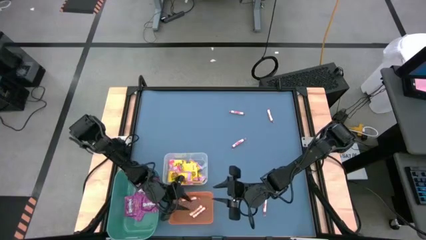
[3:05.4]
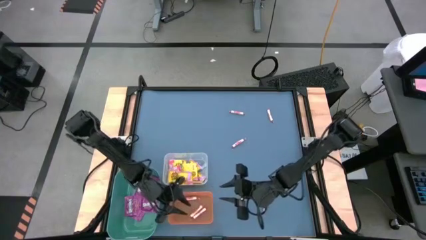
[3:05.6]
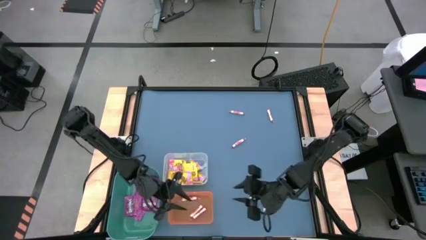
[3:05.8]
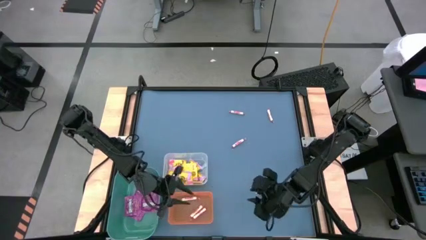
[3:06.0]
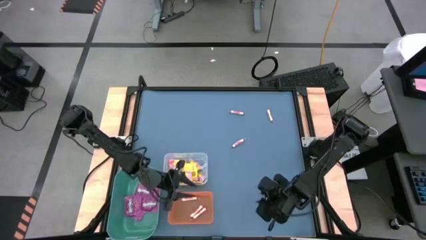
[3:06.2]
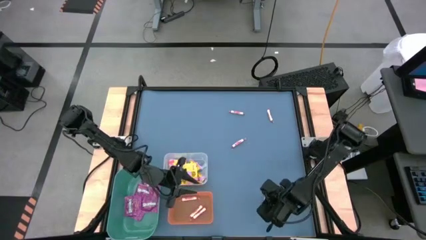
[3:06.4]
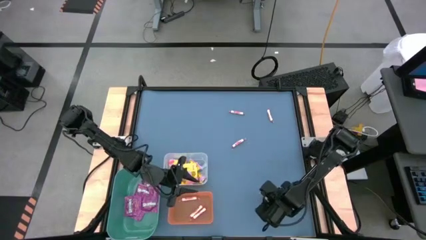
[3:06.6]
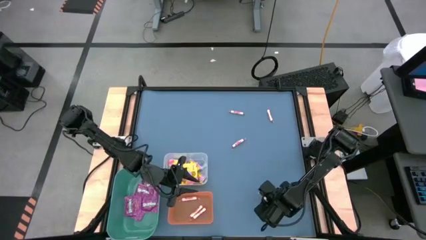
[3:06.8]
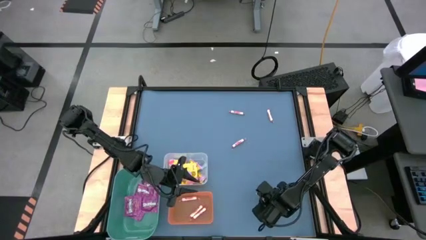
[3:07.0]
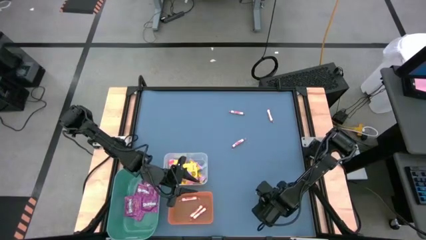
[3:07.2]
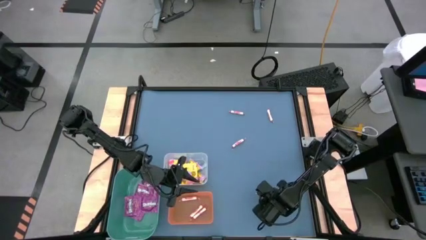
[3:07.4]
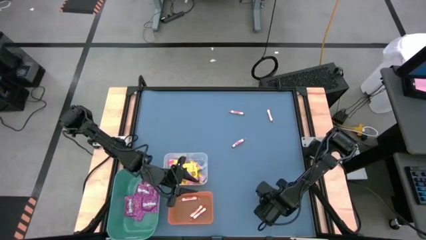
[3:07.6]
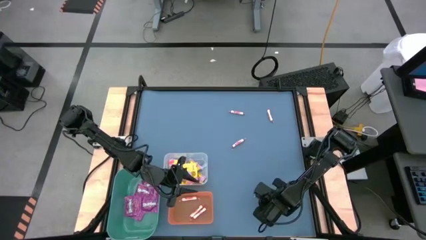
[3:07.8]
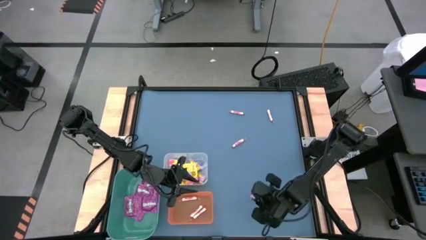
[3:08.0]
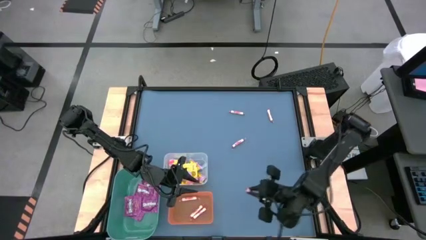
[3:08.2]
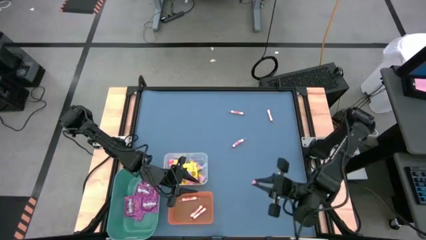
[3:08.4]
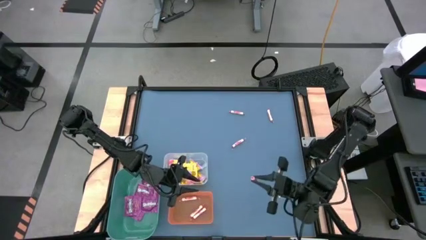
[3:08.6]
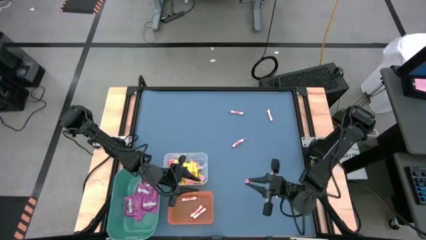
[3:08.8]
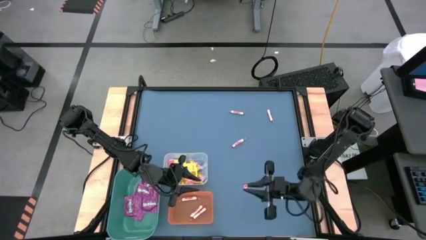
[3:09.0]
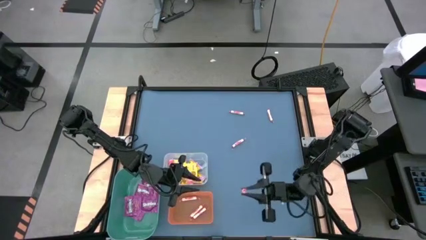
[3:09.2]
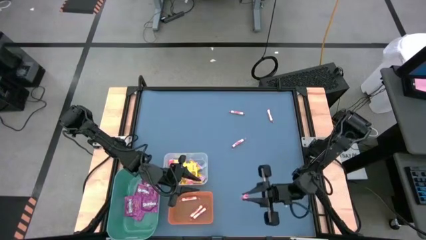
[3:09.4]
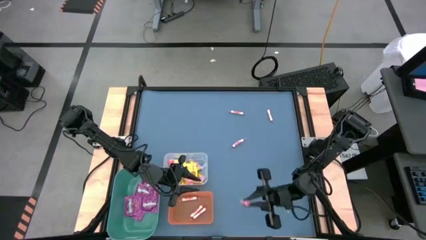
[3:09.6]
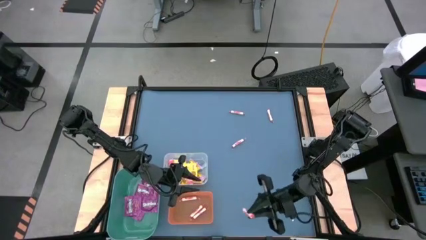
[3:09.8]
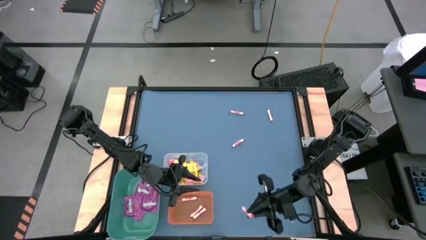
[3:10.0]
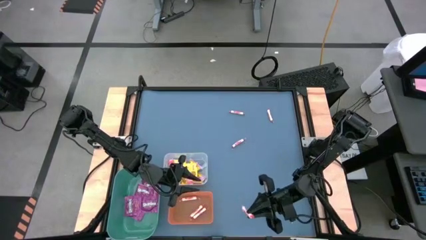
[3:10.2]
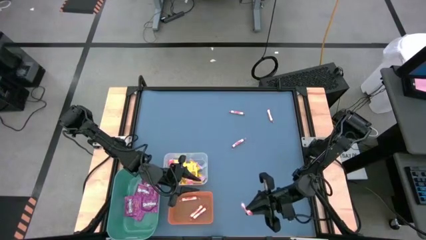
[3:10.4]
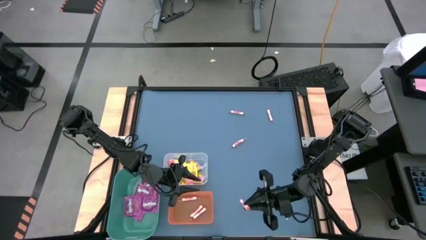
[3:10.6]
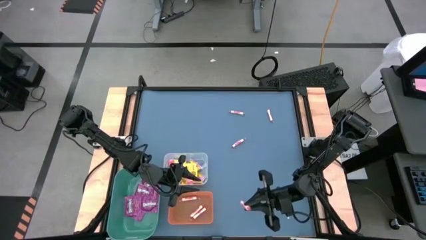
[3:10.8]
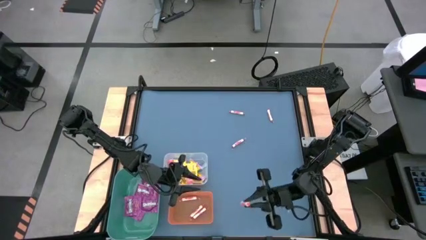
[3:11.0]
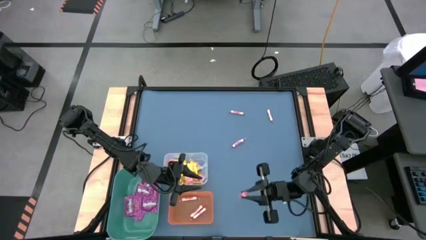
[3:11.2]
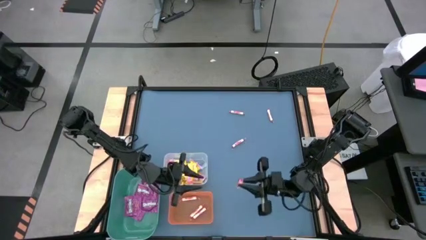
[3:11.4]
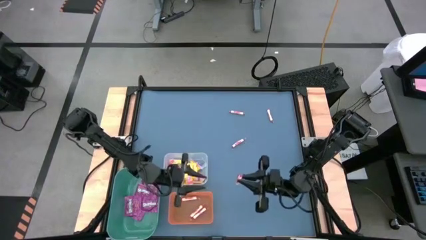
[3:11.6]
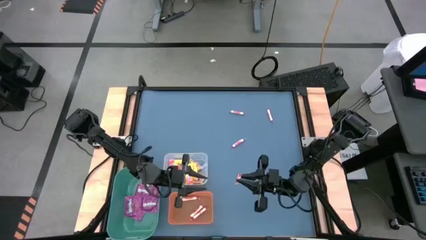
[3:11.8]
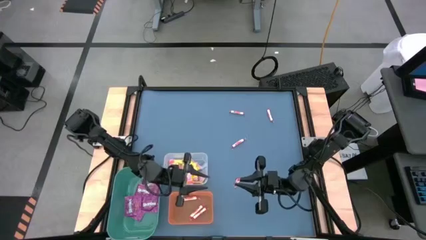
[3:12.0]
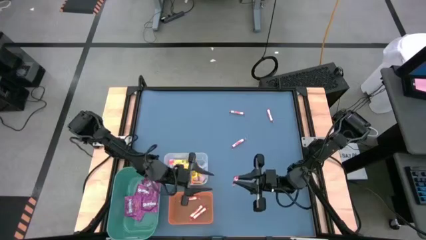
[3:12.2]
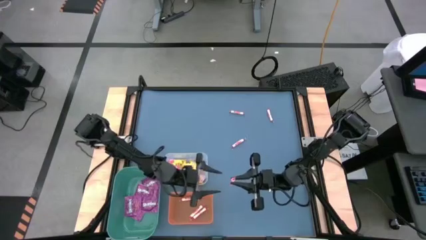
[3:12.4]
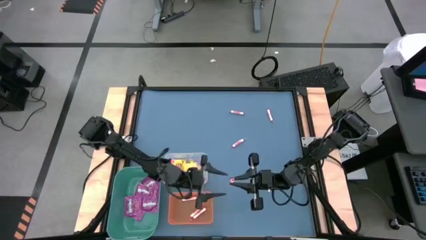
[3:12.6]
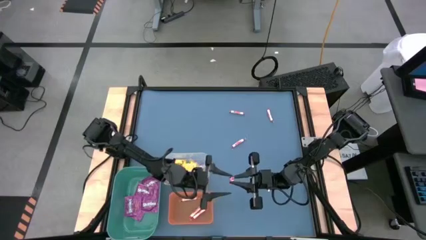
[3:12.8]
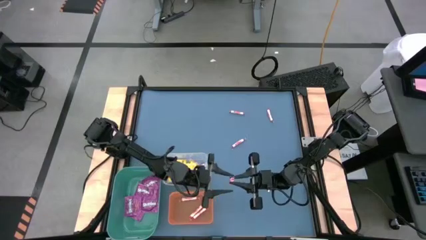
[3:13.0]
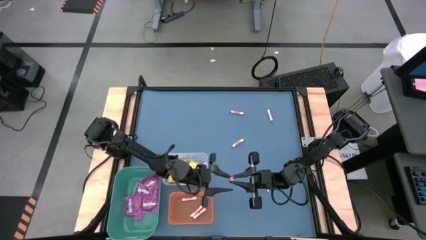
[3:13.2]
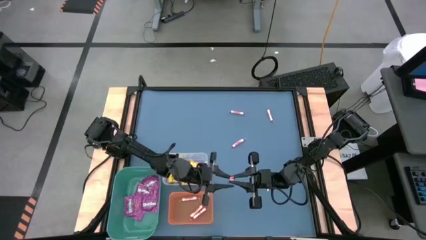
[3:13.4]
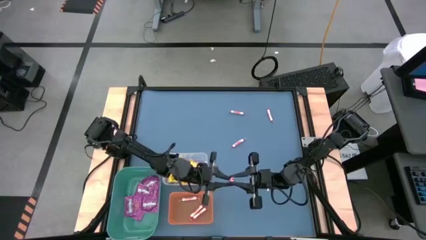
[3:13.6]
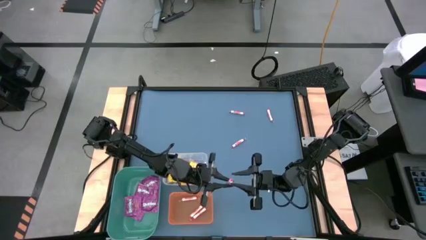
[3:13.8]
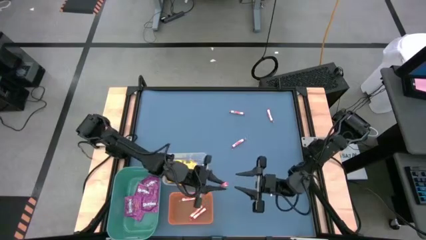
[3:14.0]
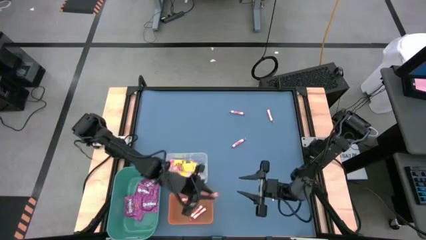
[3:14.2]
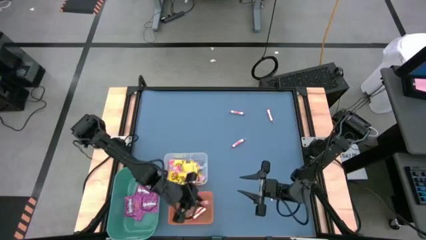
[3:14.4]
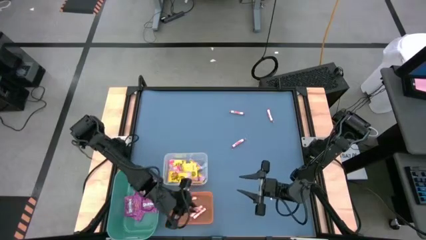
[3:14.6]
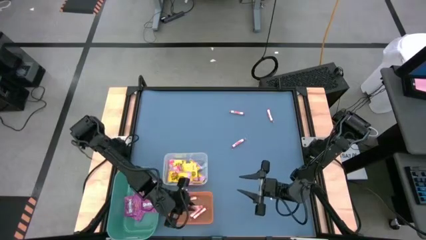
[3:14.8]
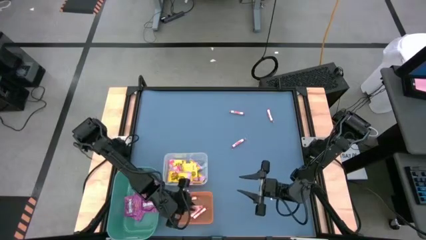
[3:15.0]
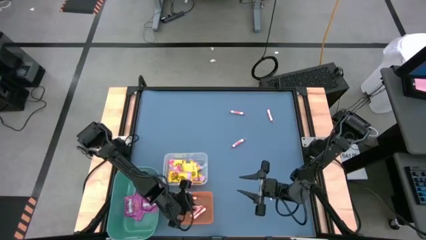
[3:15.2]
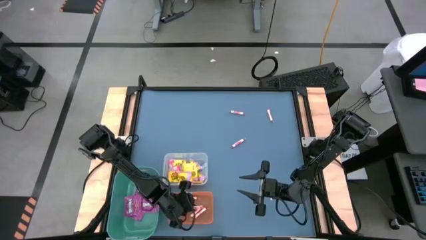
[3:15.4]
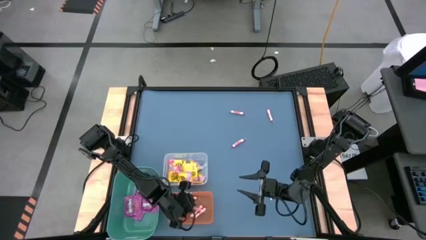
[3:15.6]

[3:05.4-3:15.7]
Task: Sort candy
Put the red candy into the orange bin

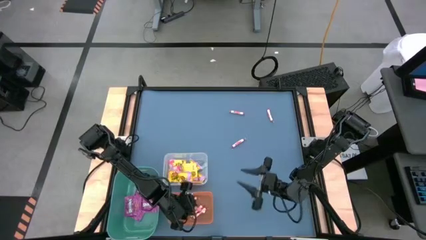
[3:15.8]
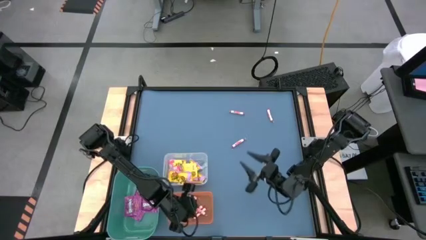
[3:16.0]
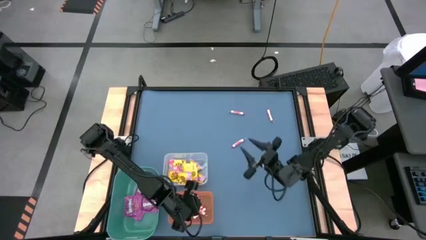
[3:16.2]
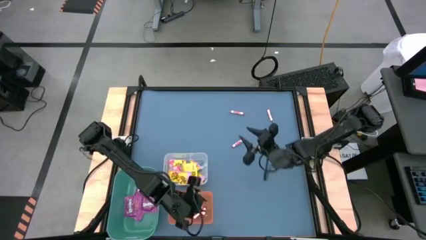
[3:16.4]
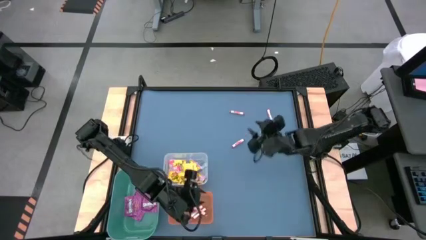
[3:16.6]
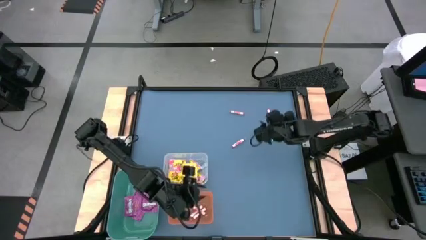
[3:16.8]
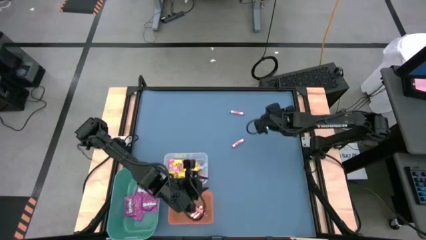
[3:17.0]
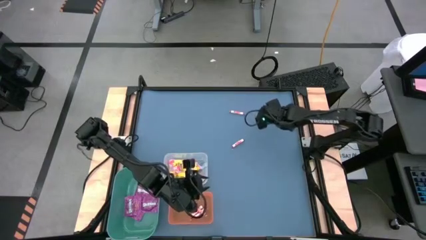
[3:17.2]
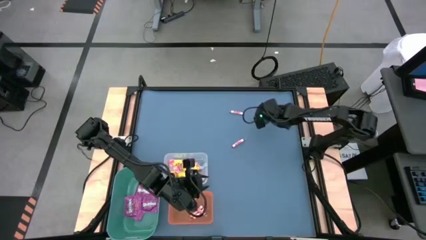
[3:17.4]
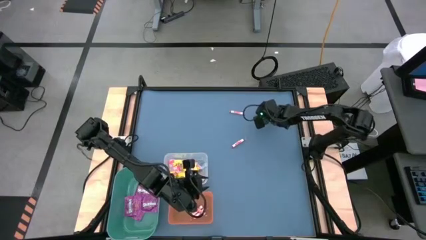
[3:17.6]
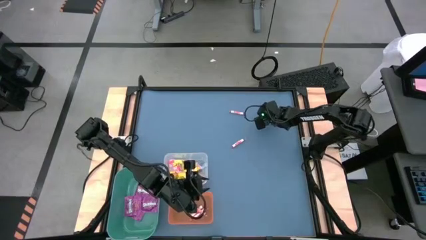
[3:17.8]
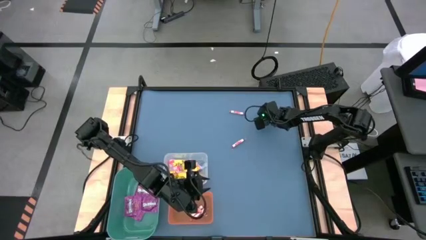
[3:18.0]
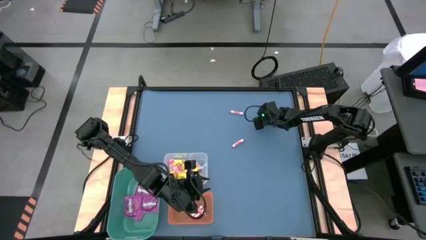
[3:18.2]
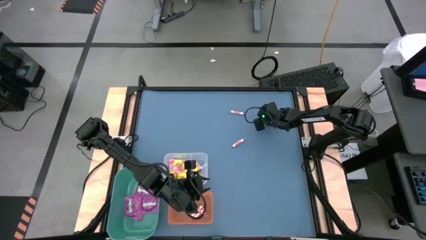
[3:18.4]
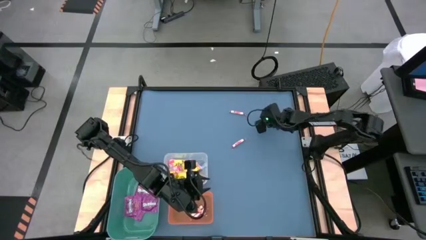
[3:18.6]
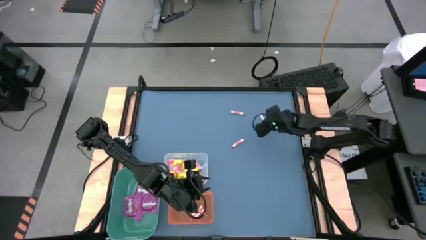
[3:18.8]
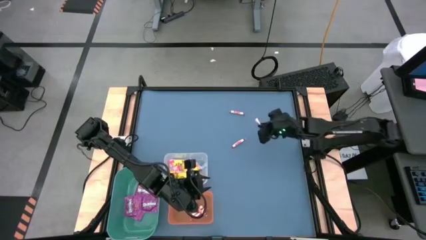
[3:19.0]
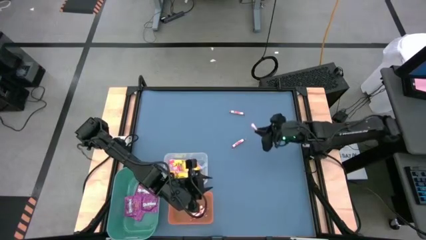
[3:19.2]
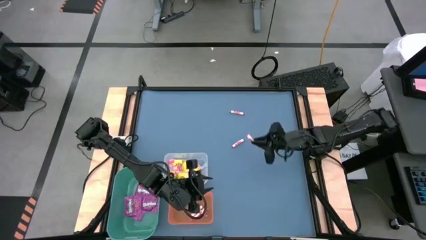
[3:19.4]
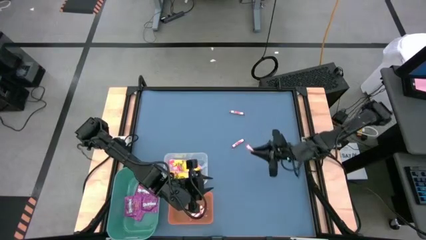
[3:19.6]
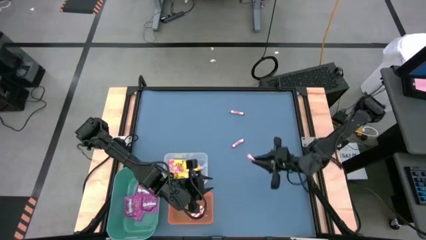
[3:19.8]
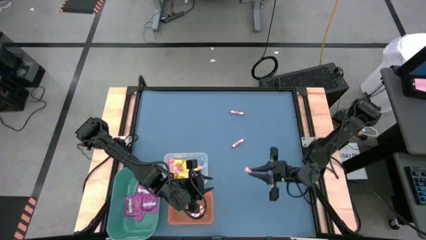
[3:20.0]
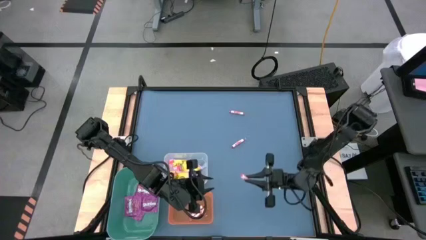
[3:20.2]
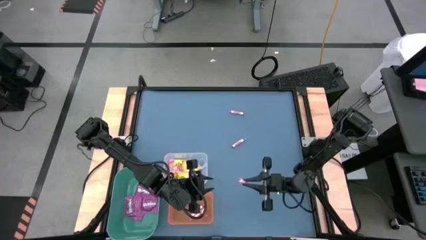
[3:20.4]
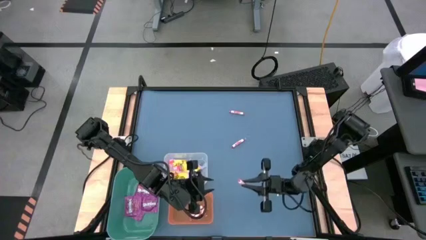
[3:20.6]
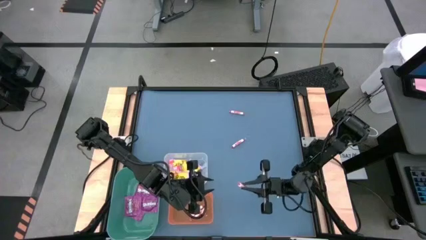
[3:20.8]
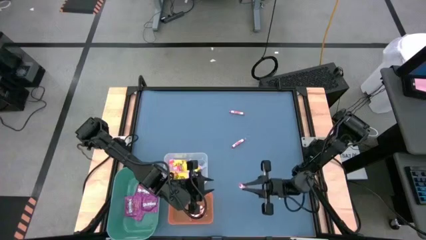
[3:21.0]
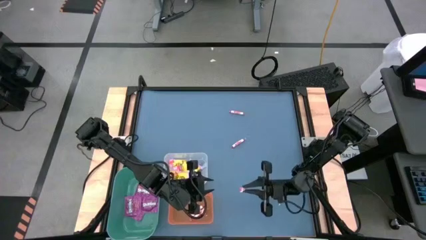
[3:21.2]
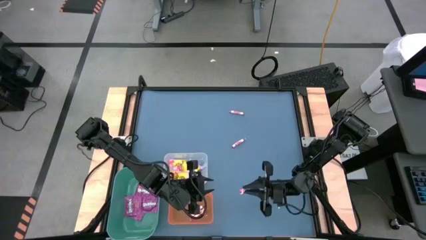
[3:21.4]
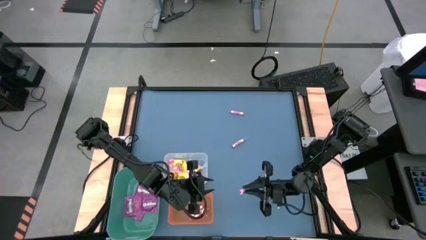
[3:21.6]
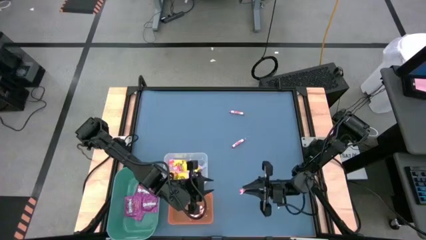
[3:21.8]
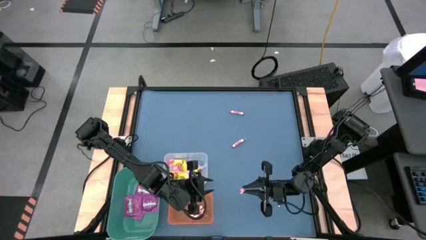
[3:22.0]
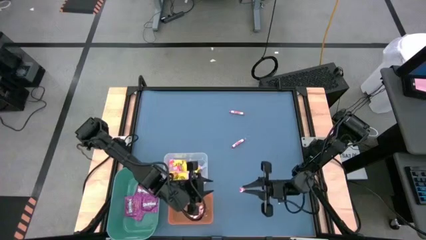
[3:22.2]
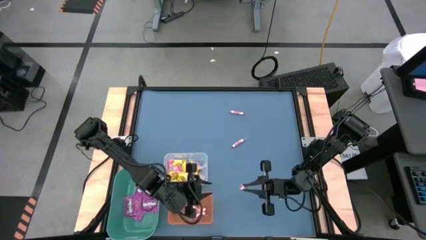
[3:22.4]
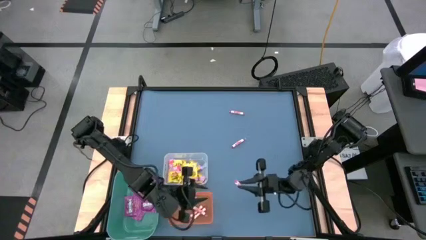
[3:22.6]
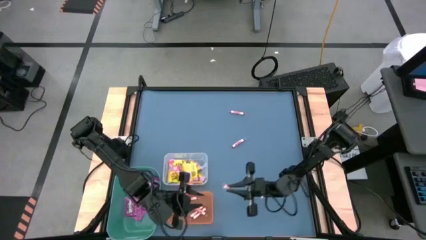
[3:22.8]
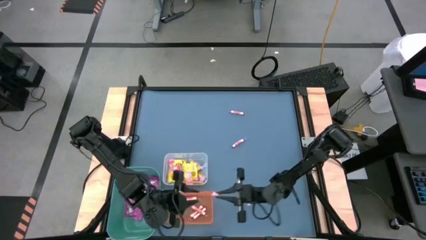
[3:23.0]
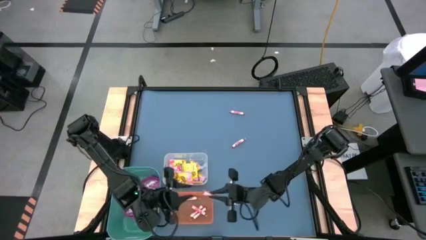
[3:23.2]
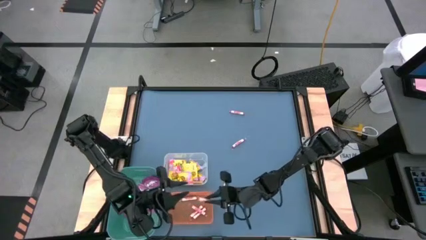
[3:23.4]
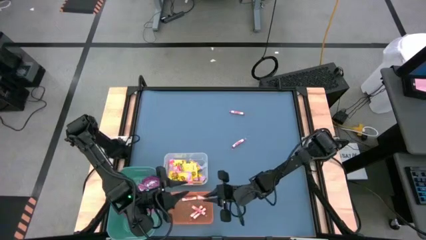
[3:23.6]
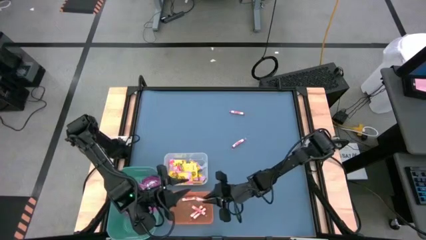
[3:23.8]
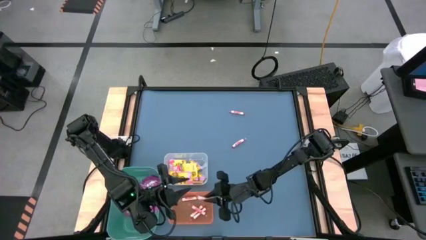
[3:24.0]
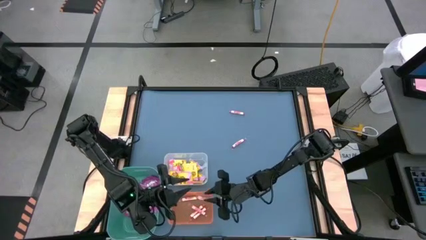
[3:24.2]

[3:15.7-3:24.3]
Put the red candy into the orange bin
